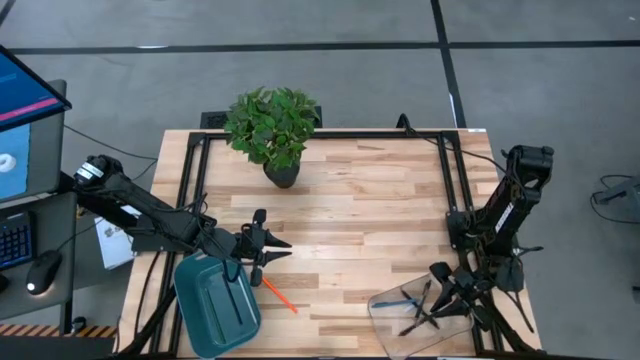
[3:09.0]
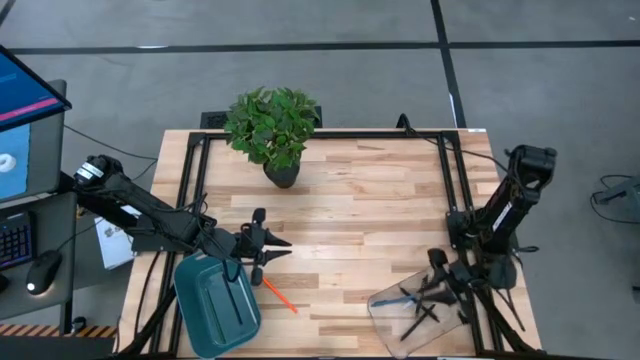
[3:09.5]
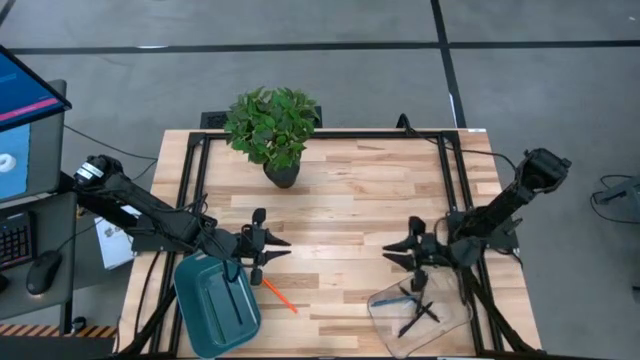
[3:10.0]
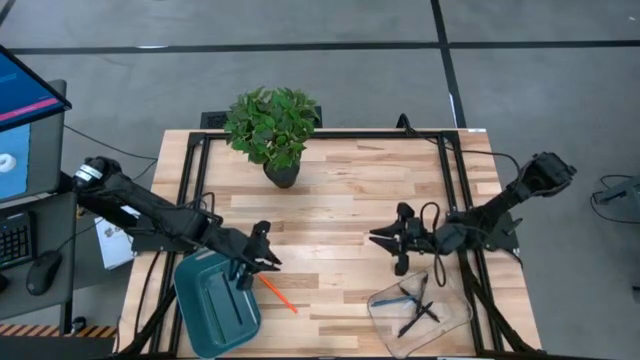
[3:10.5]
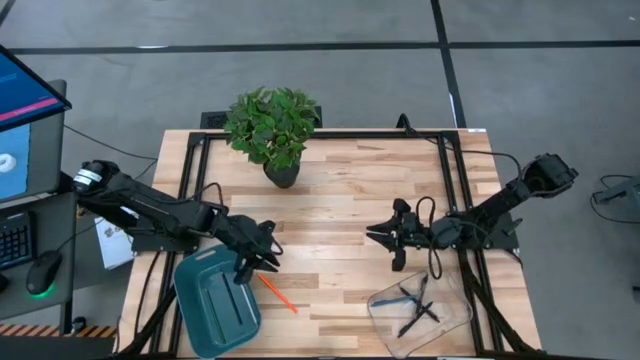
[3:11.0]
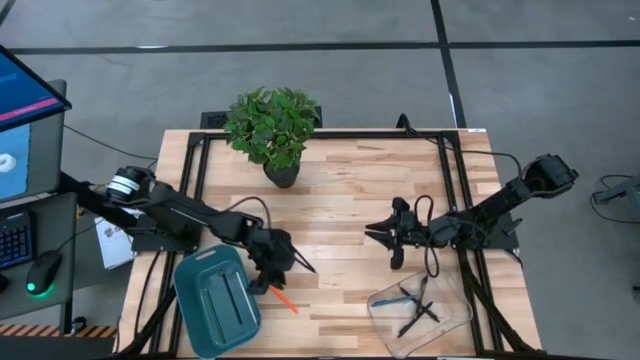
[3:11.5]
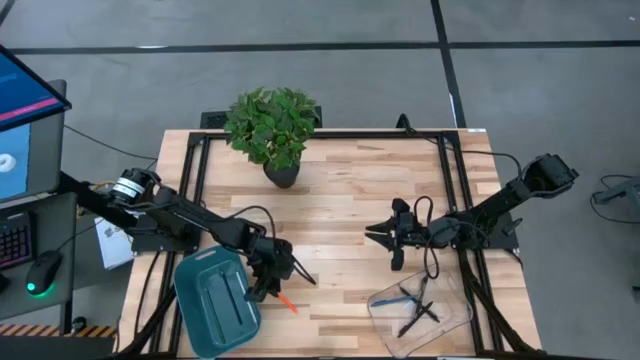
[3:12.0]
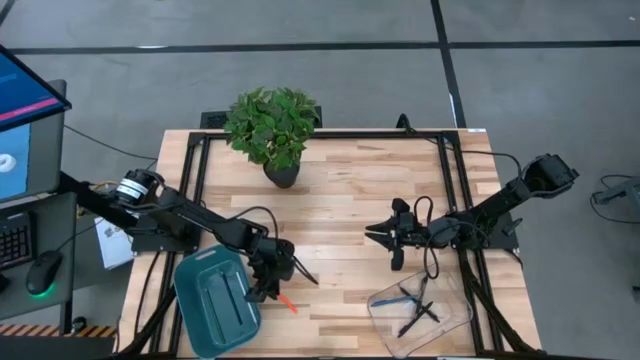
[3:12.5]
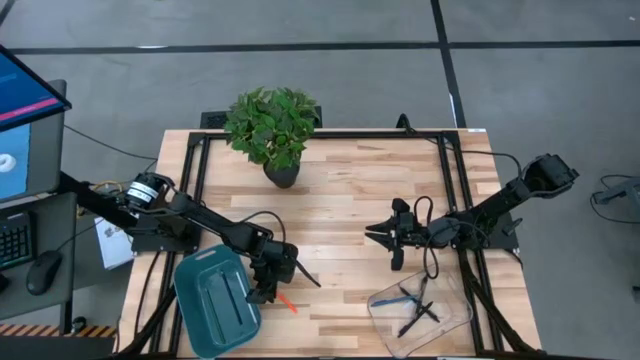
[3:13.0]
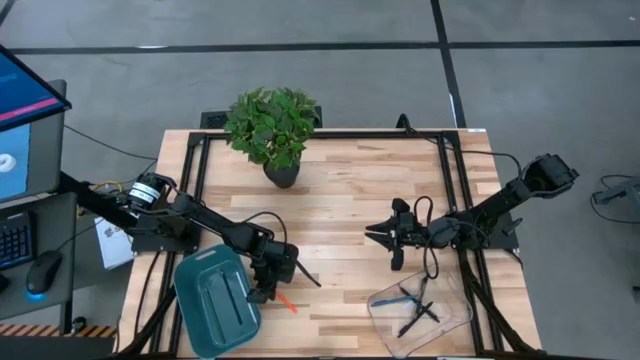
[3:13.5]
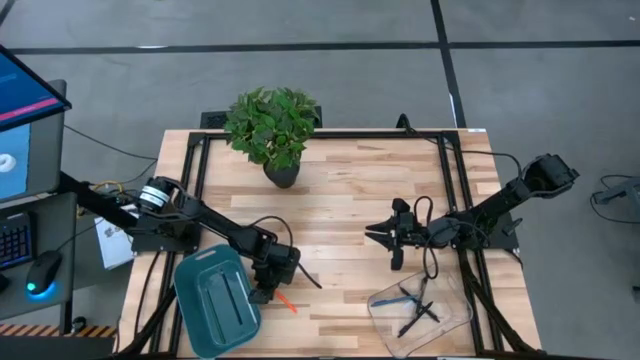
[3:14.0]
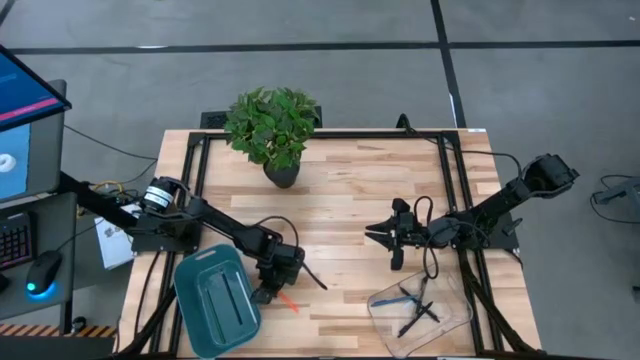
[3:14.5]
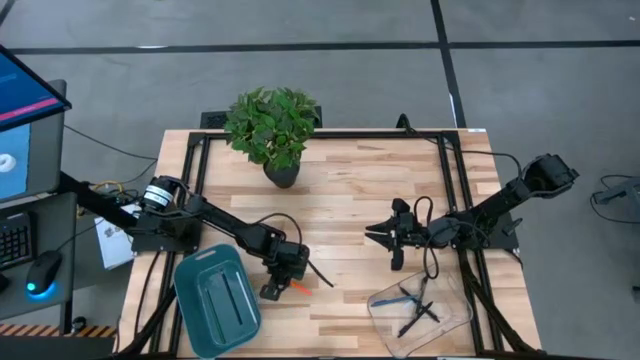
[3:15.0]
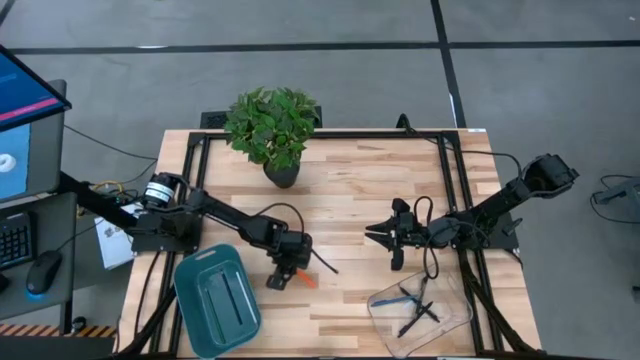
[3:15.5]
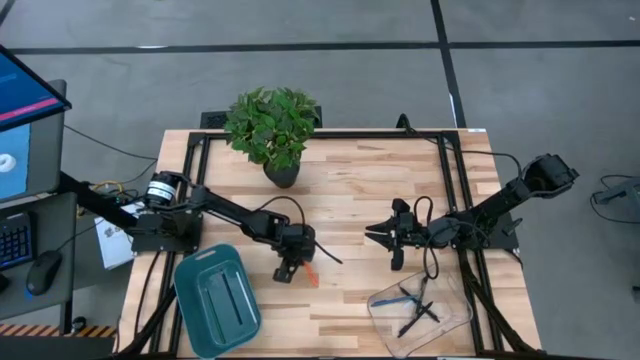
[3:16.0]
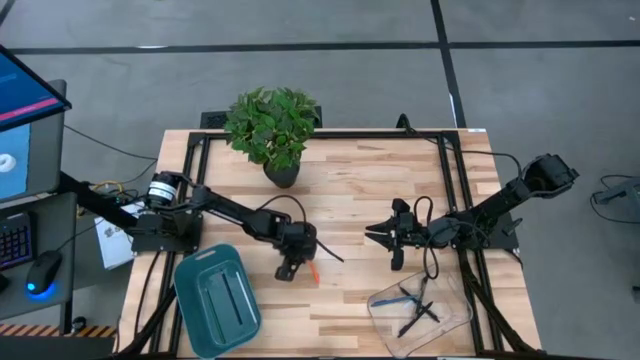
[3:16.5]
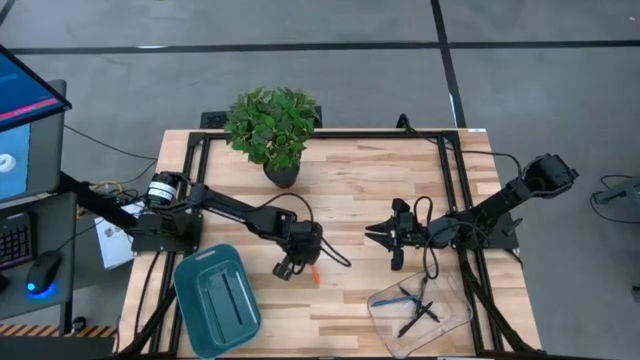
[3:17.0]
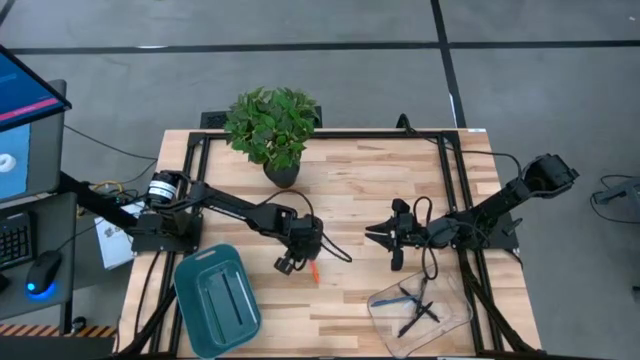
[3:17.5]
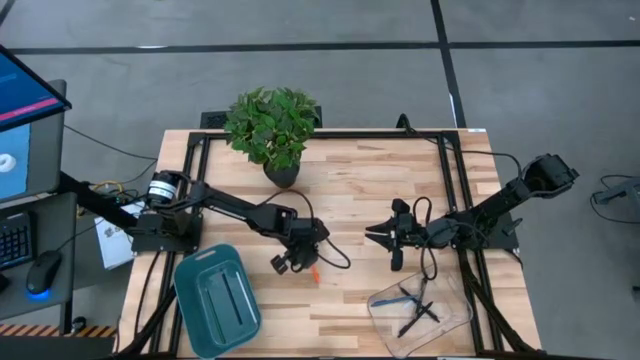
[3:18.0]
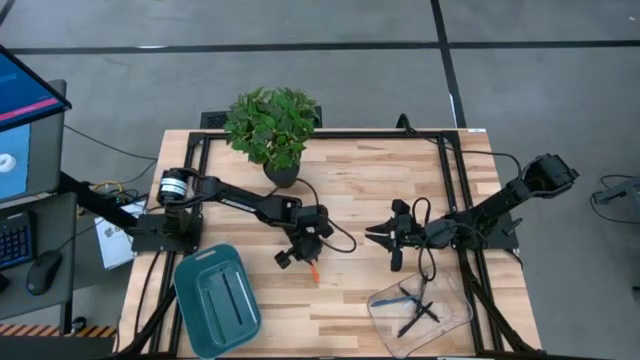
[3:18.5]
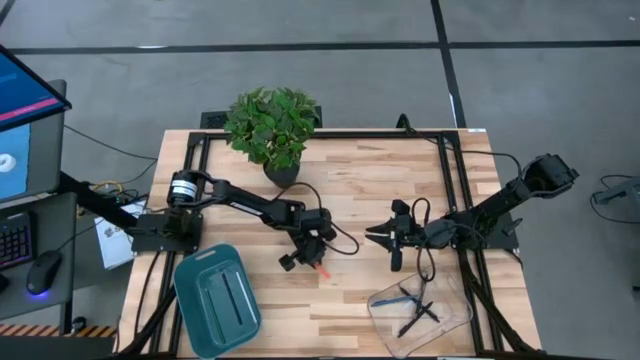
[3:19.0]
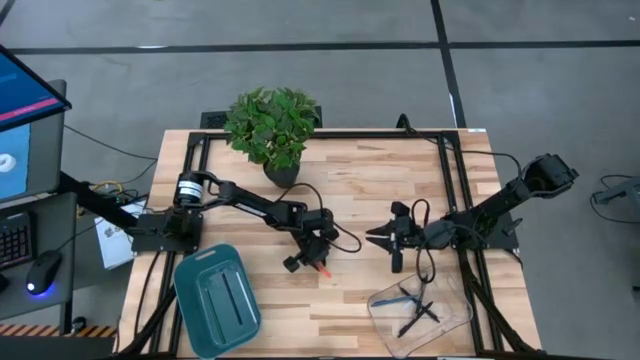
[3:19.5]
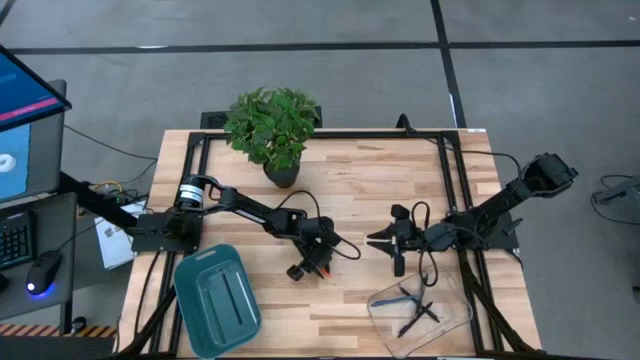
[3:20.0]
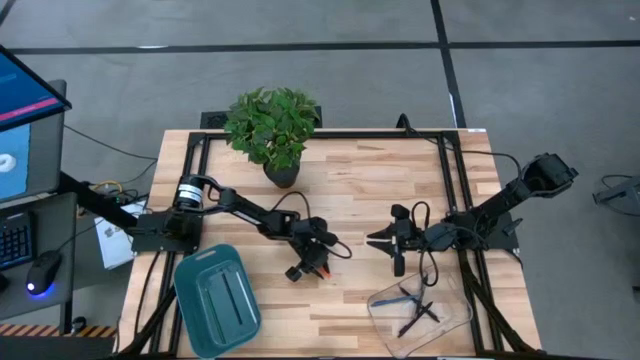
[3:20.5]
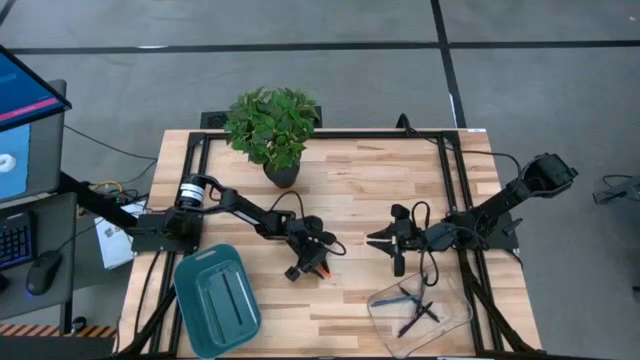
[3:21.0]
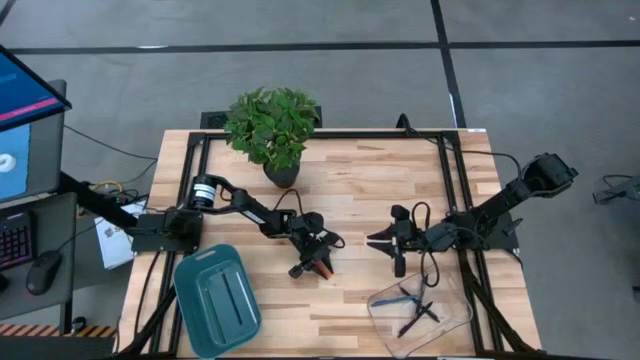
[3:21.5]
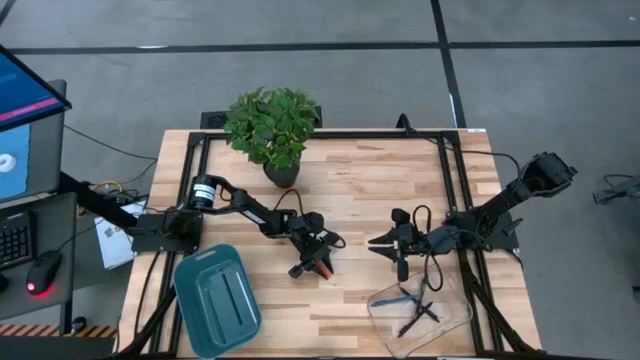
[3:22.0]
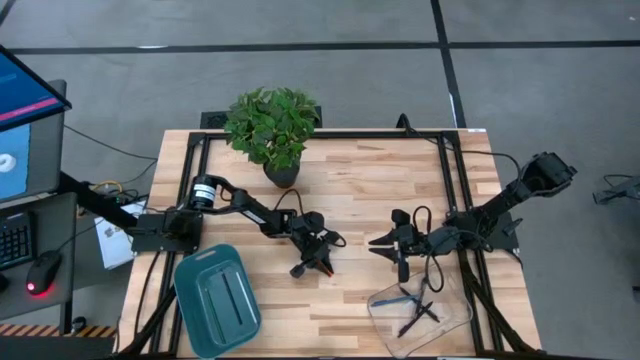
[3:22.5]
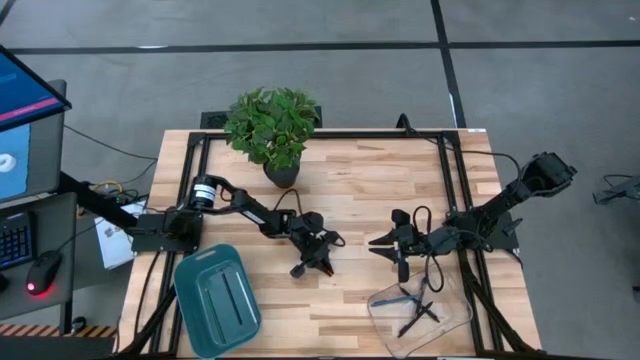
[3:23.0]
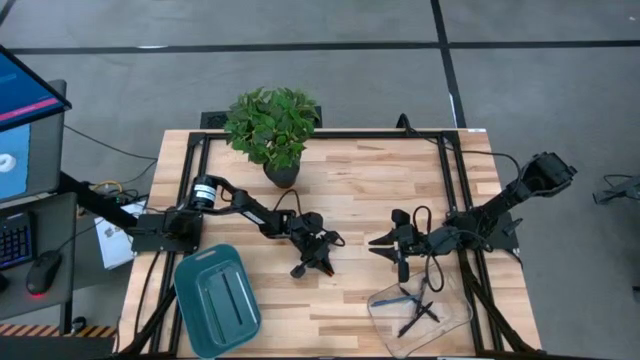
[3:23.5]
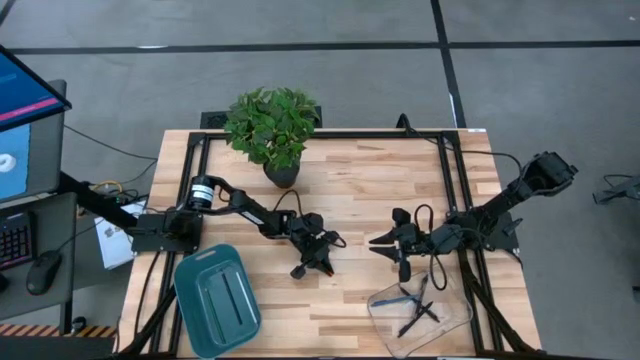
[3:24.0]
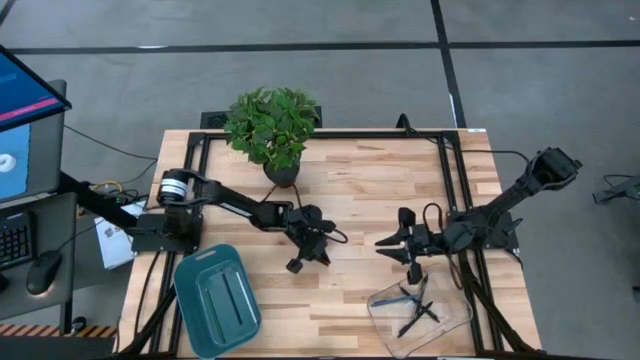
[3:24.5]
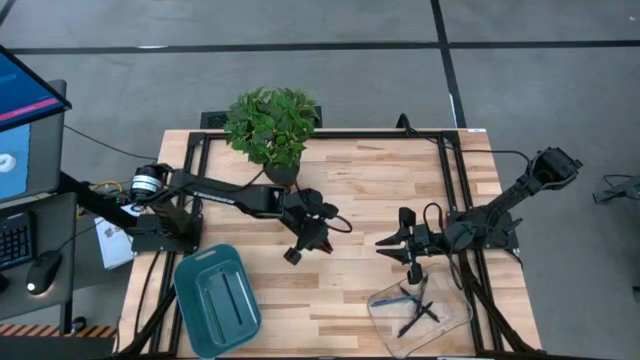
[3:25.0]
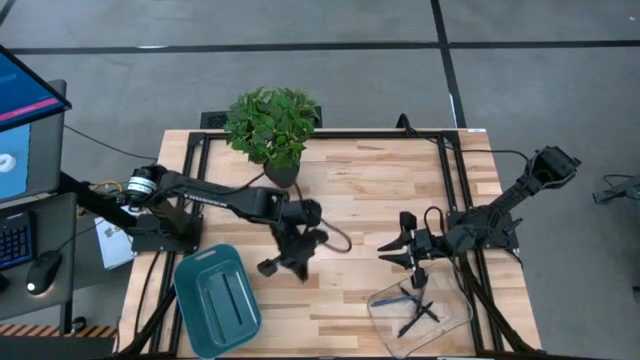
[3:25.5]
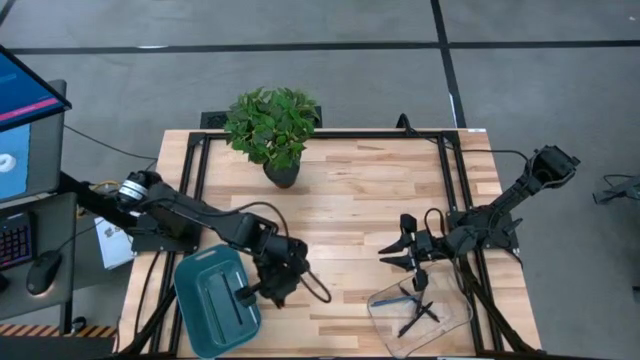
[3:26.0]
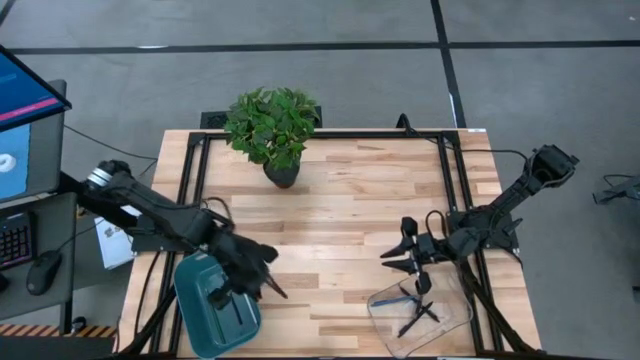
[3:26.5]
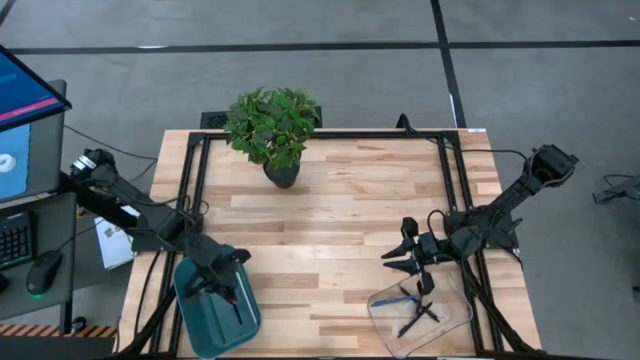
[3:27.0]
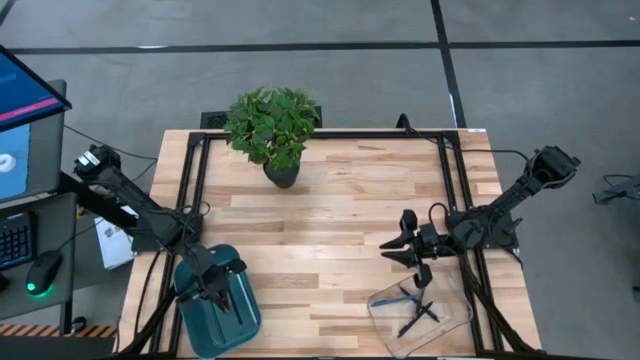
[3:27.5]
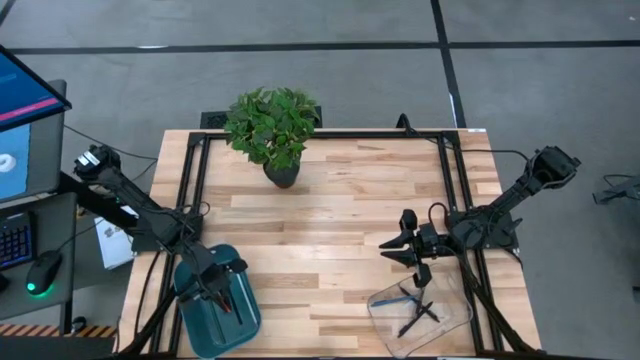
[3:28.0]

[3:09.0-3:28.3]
Task: Sort pens & pencils
Put the orange pencil into the blue bin

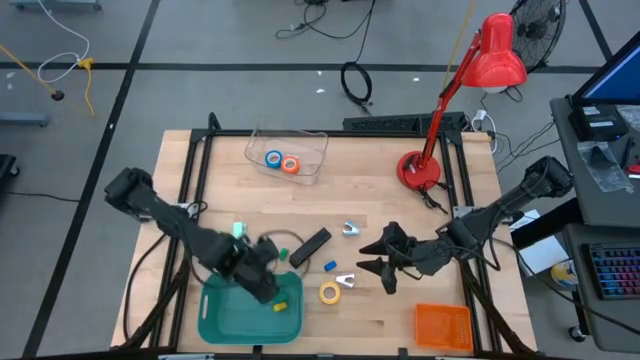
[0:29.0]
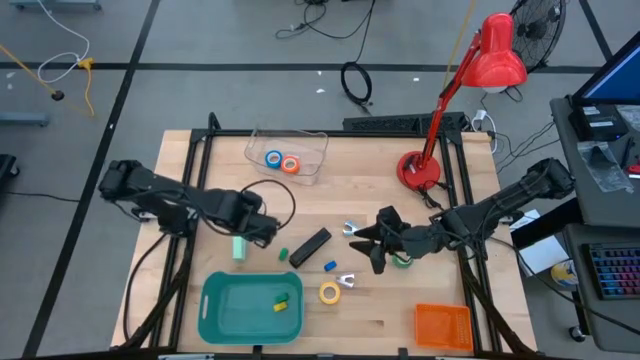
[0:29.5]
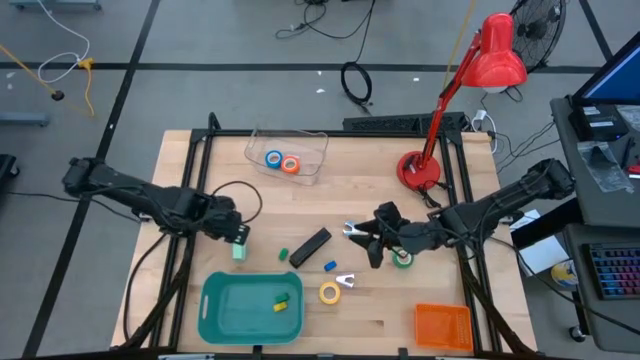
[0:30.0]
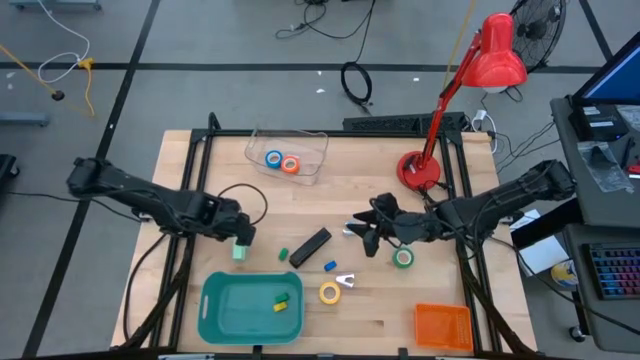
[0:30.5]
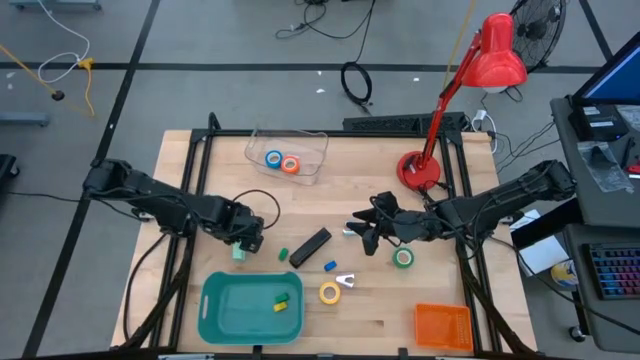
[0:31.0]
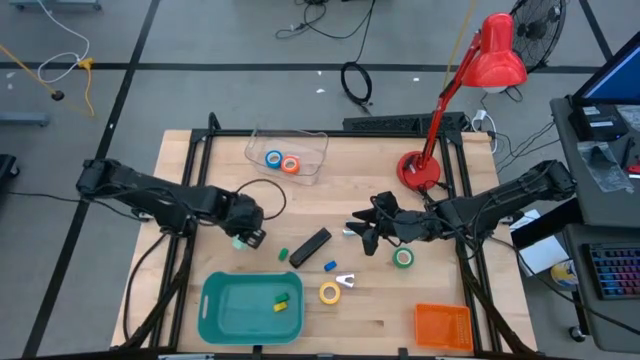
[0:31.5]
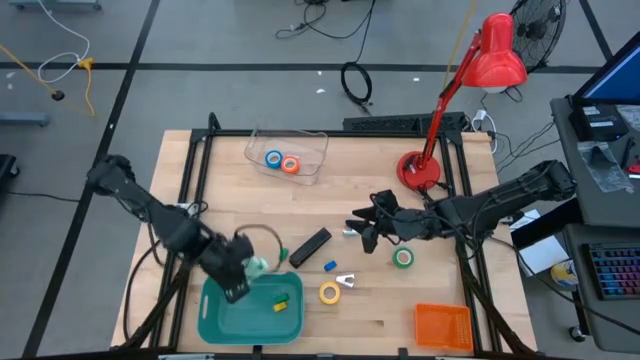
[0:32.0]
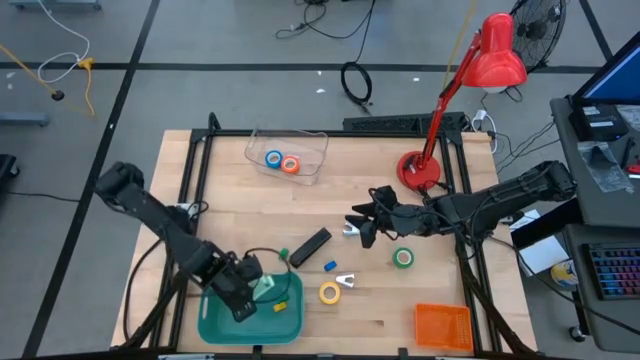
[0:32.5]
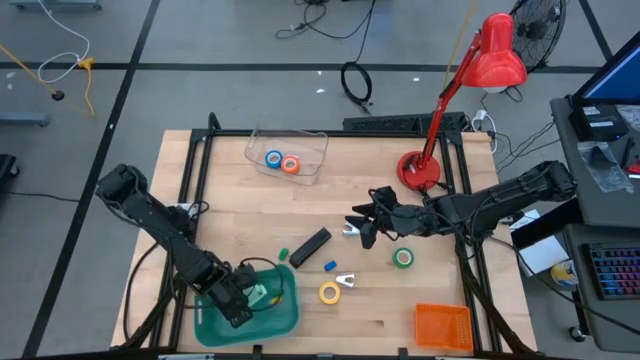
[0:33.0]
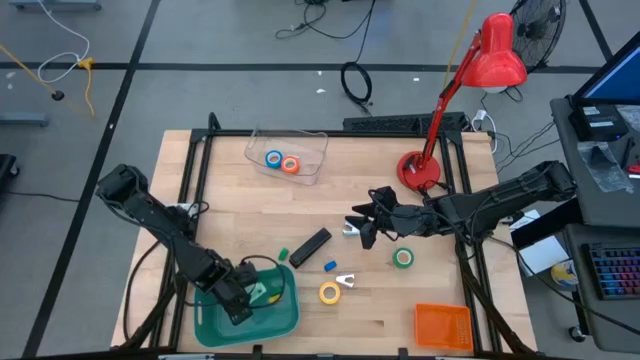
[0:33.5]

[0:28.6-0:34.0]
Task: Pick and place Stapler, Stapler remover, tape
Put the large light green stapler into the green bin
